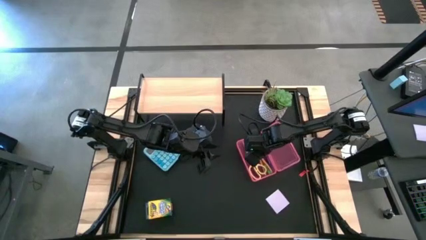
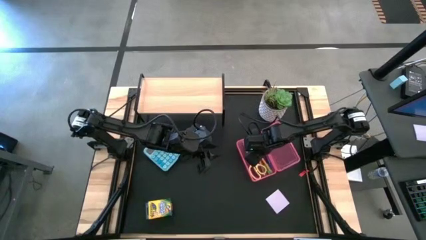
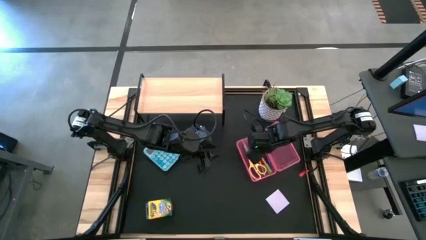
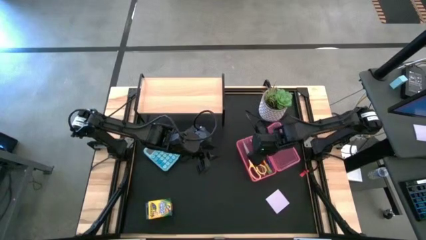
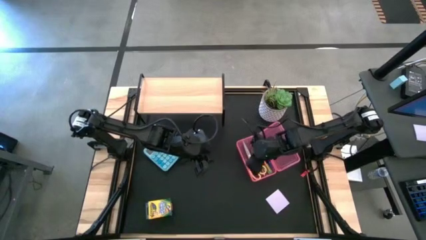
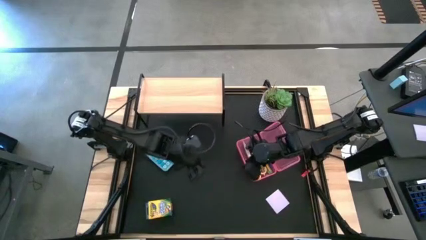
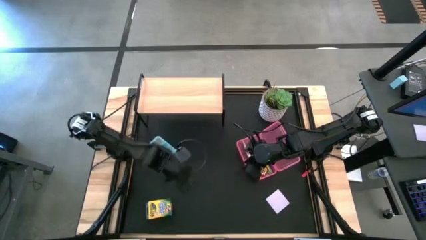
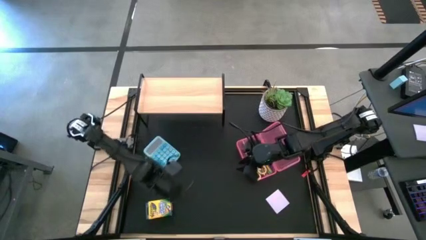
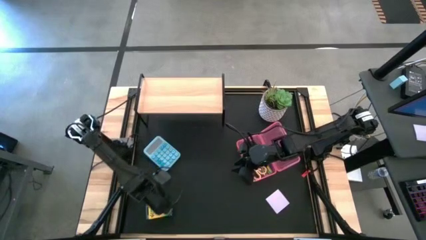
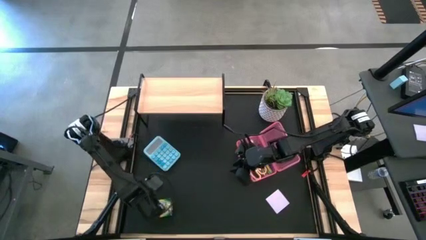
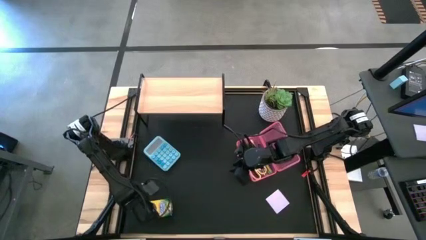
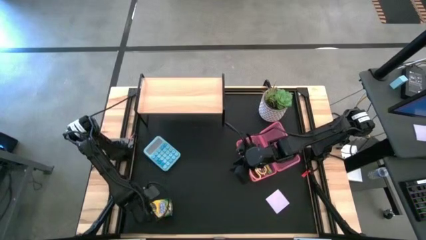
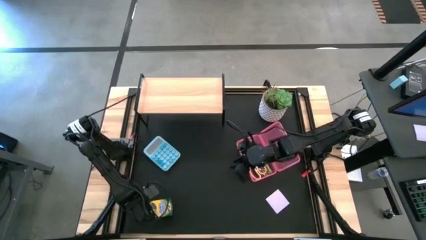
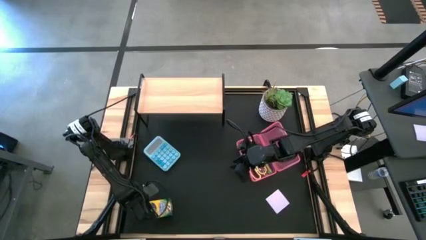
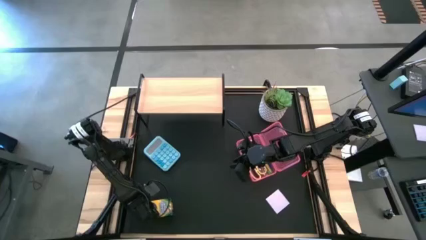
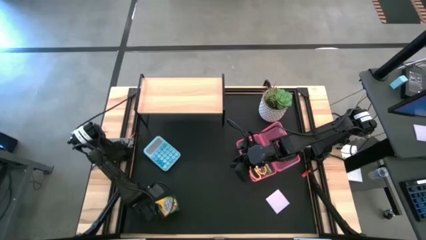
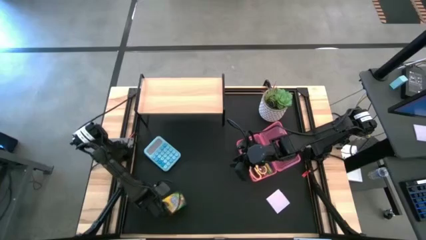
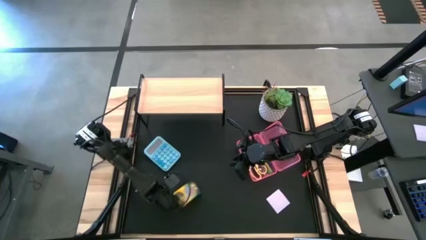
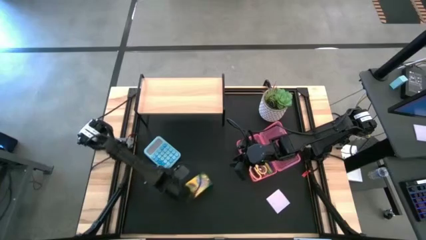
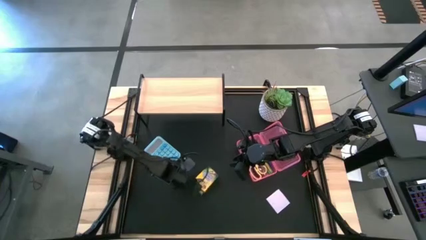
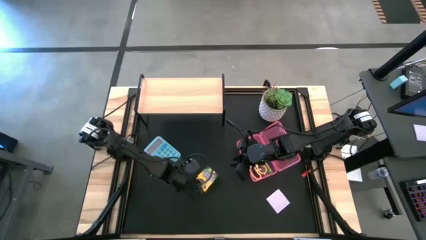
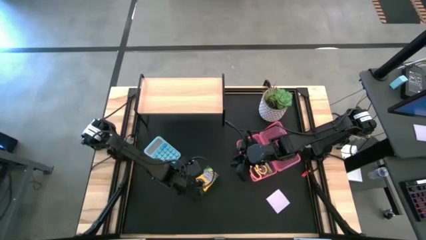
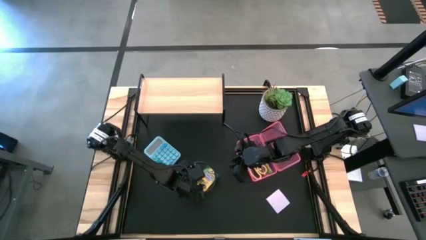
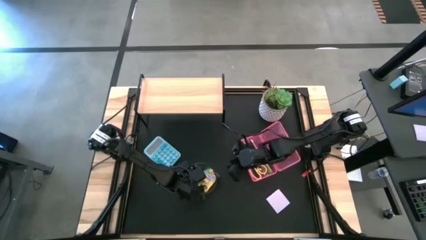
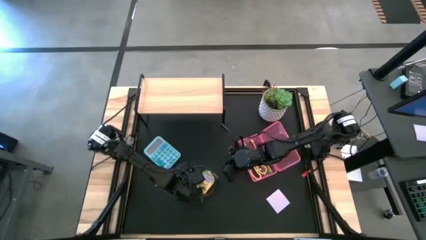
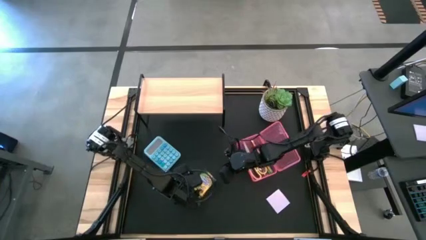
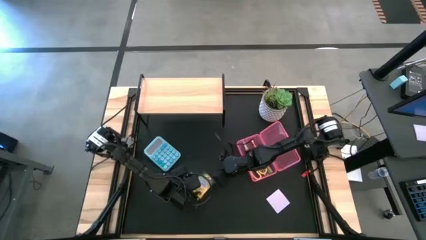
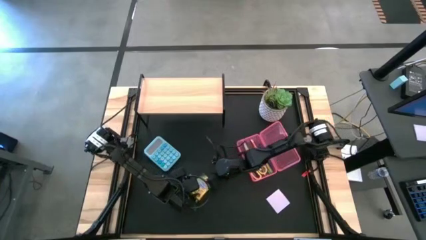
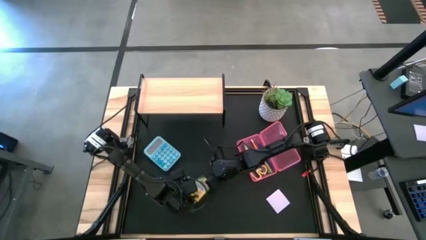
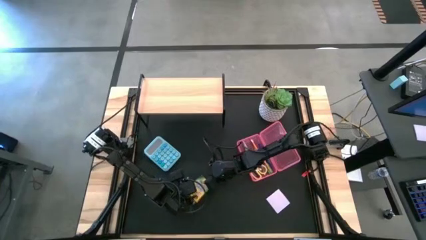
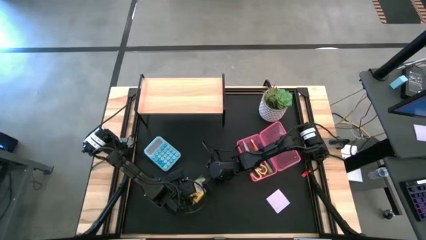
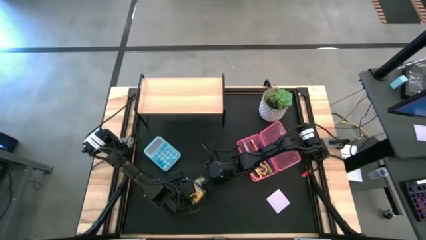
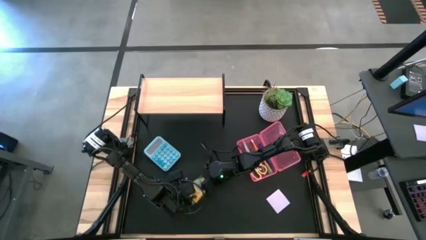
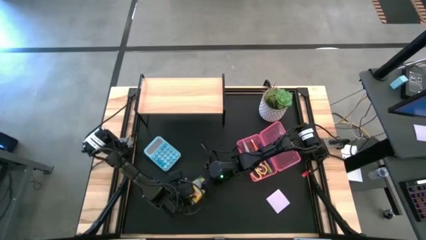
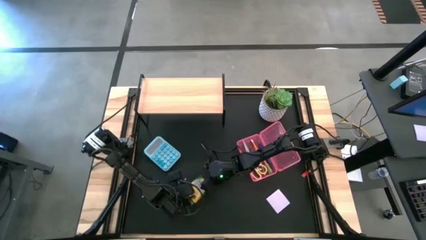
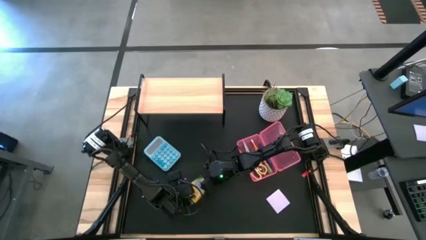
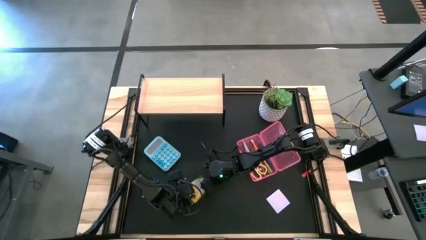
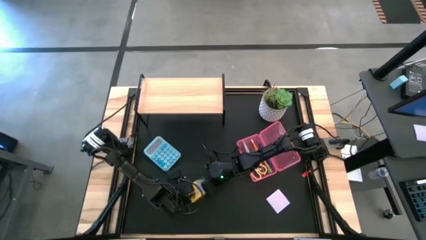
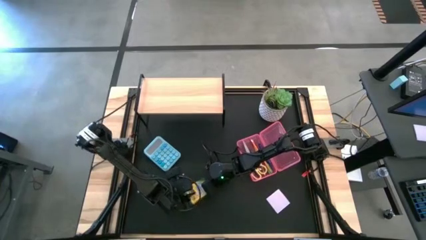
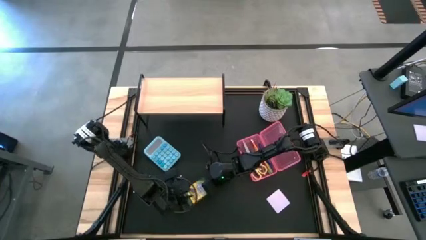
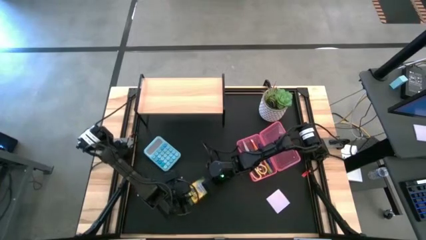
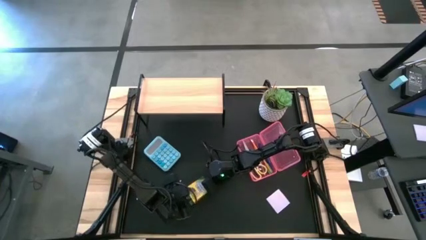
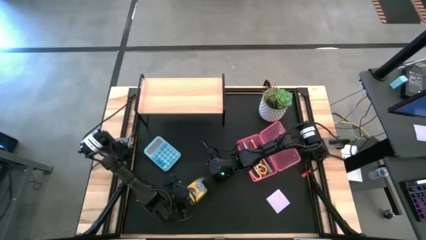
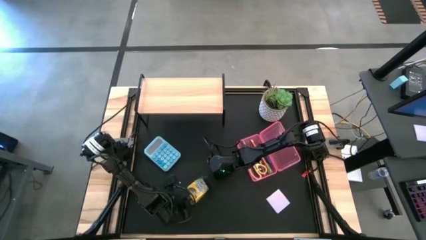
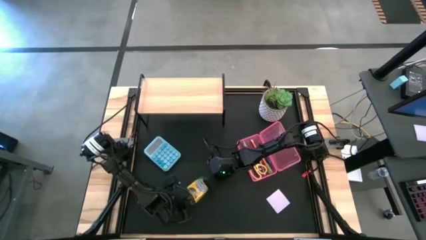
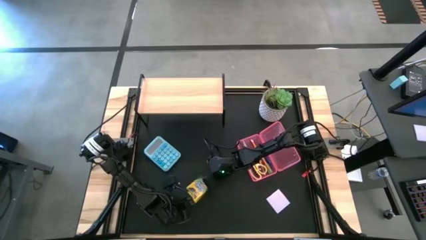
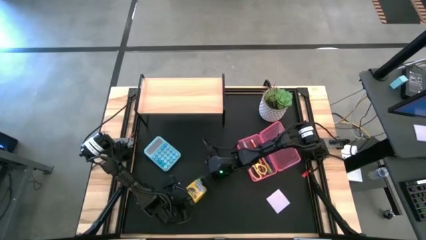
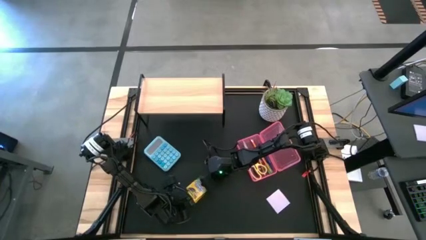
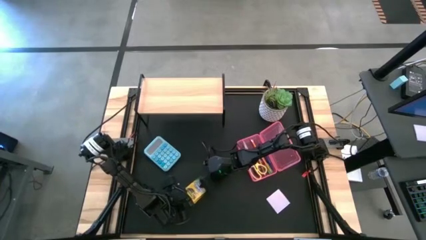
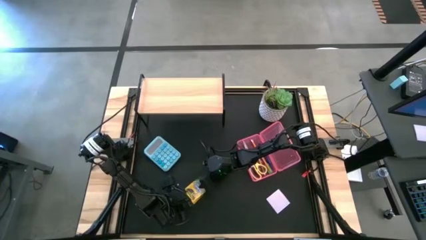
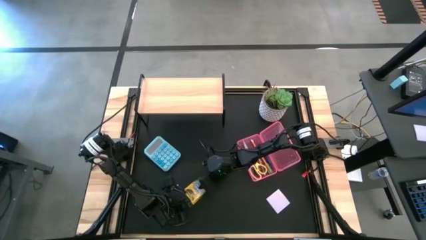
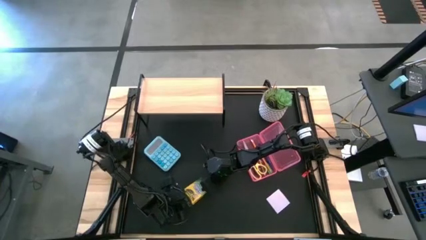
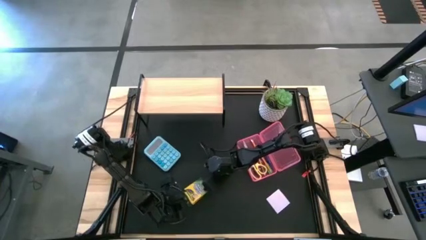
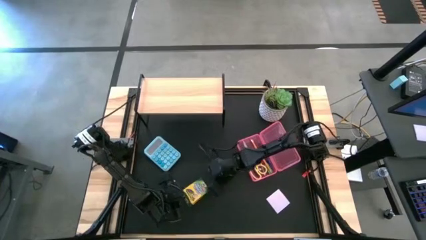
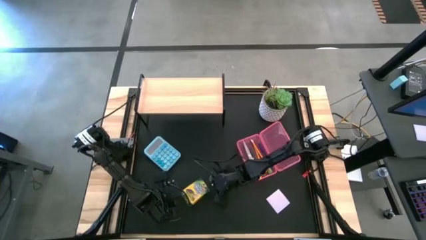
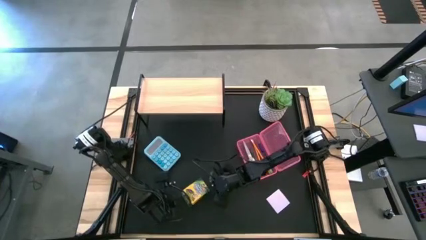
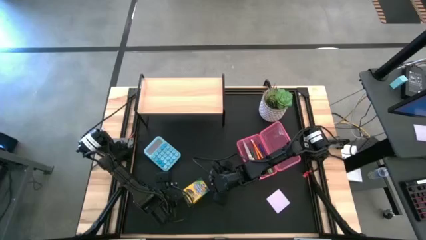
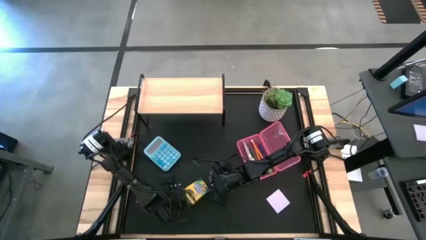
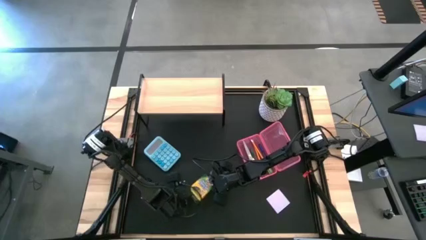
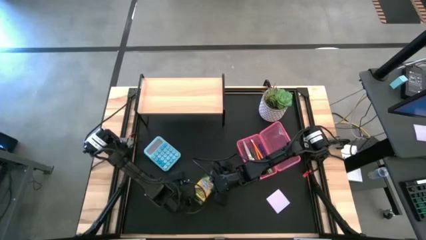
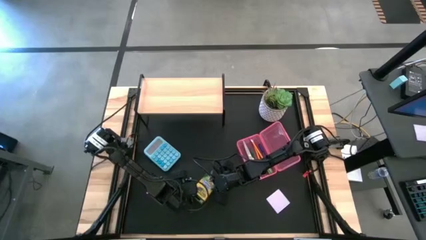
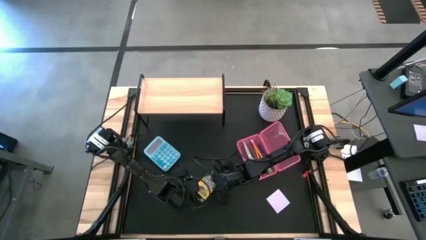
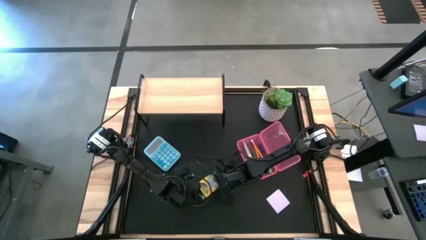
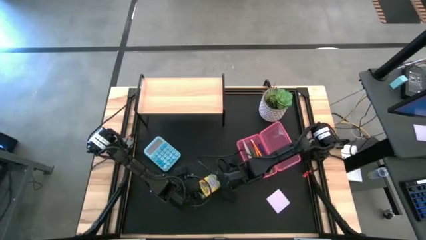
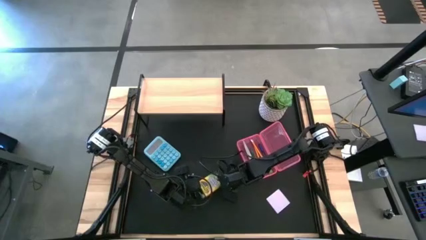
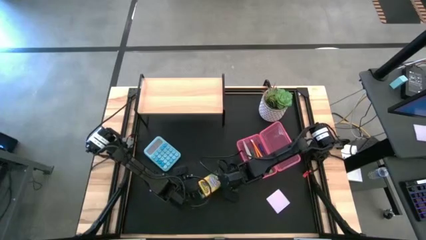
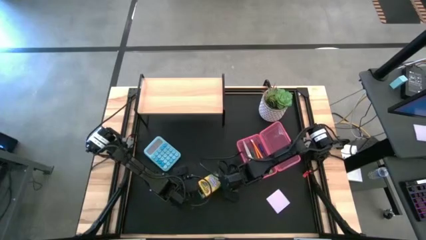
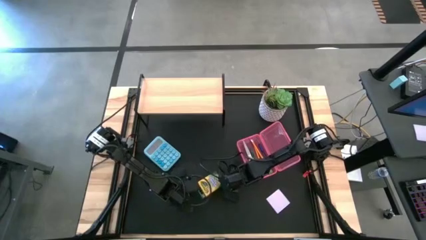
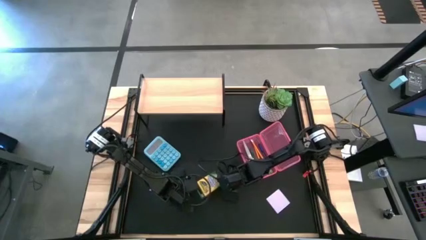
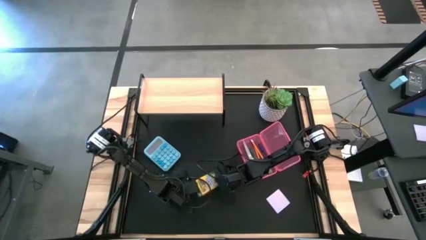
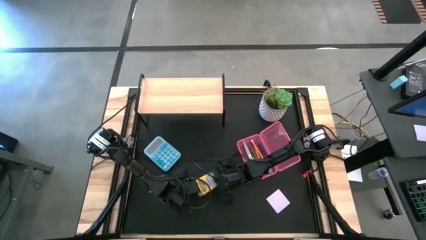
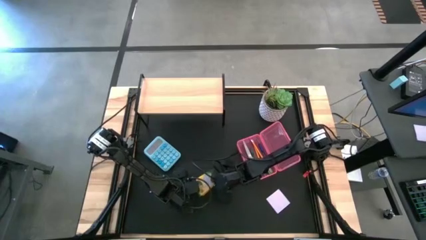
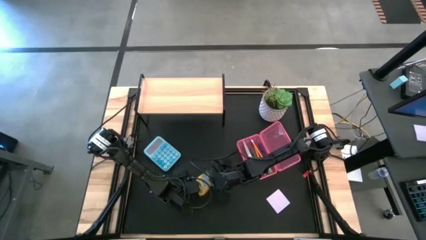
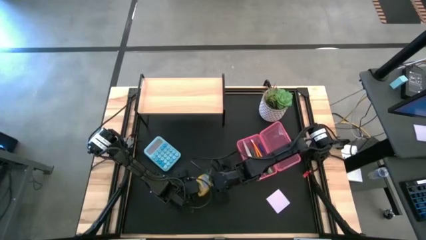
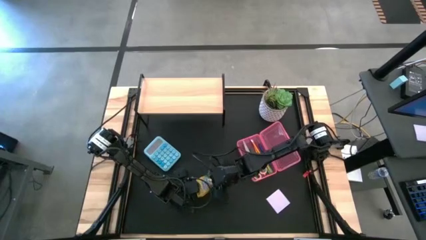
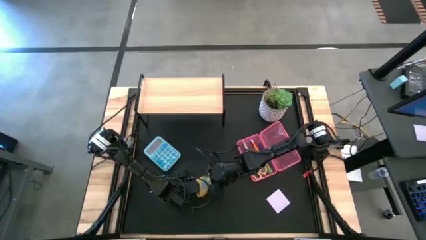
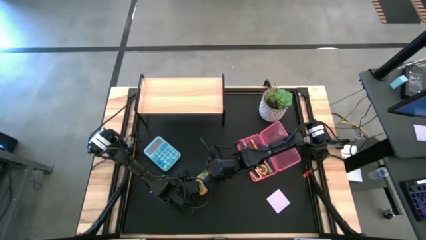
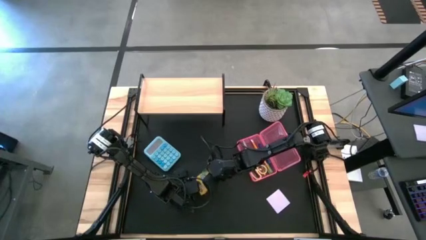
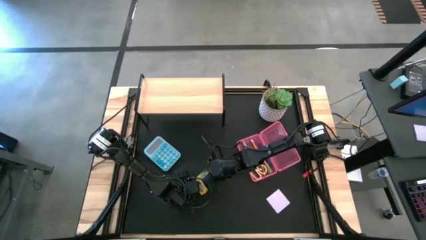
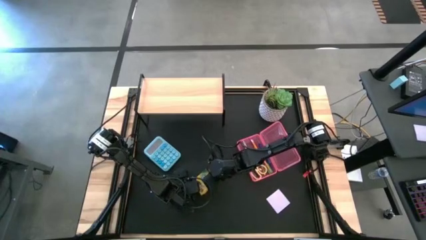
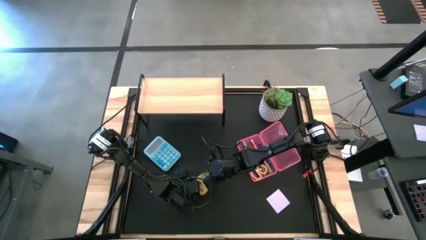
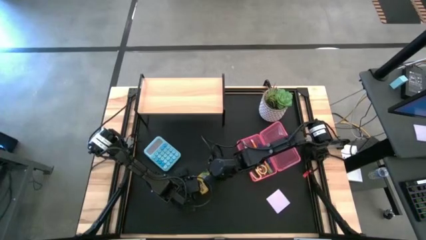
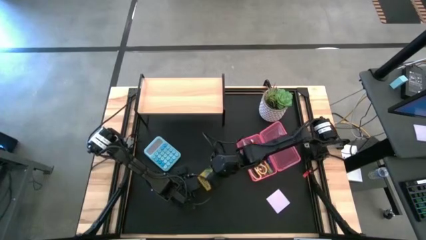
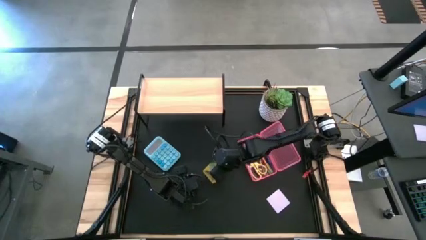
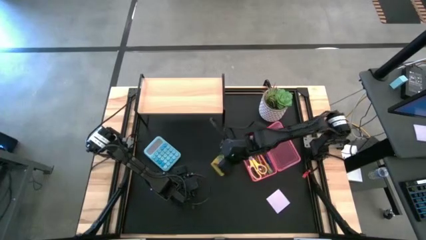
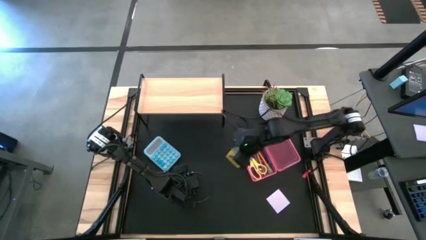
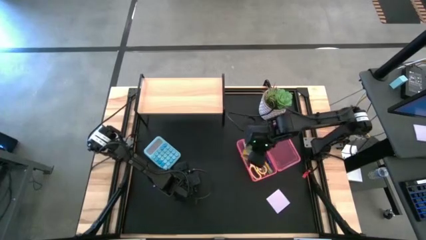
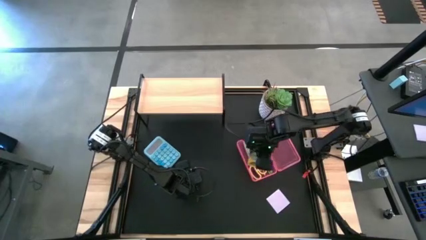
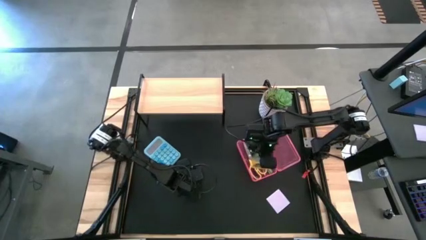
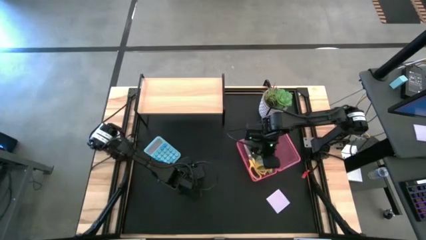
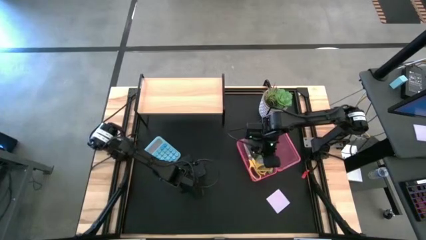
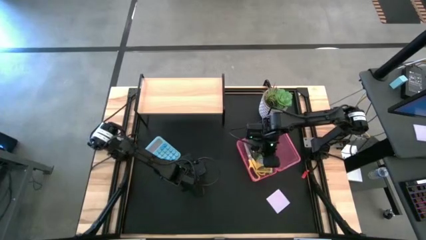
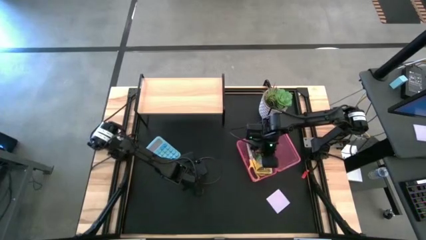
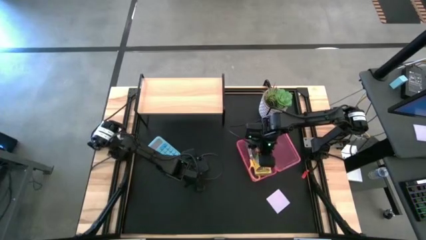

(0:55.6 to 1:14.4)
Task: Pack school essentials
Put the yellow crayon box into pink supply box
